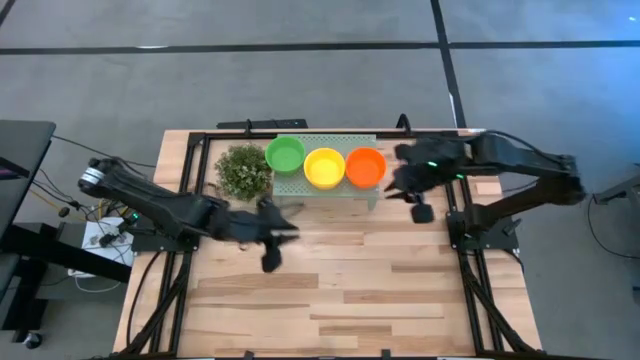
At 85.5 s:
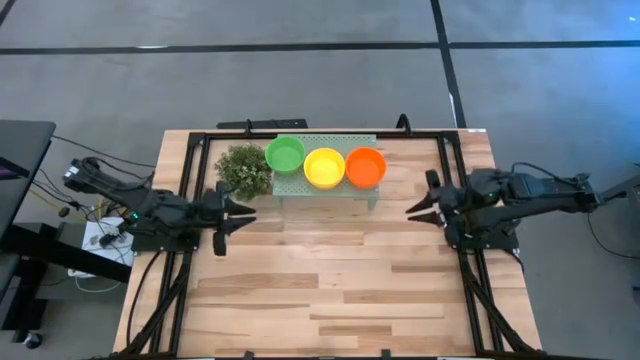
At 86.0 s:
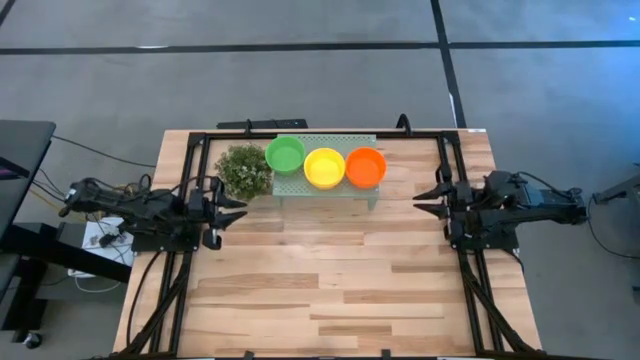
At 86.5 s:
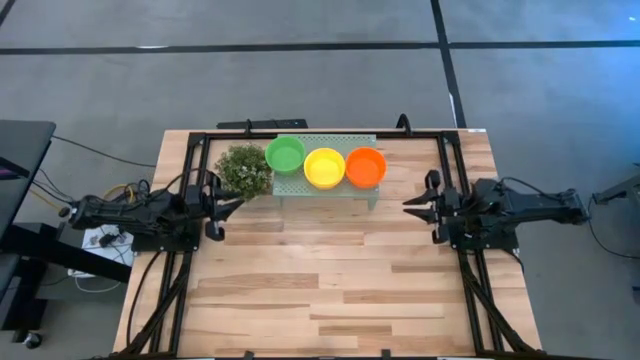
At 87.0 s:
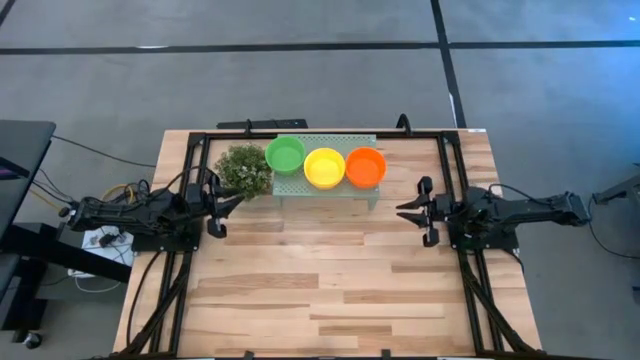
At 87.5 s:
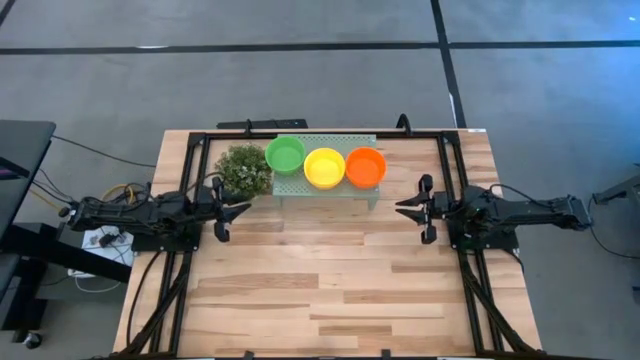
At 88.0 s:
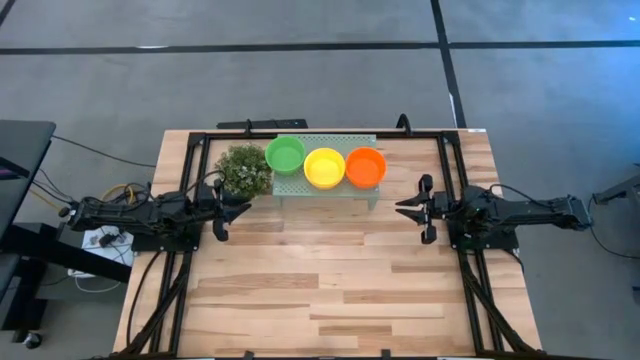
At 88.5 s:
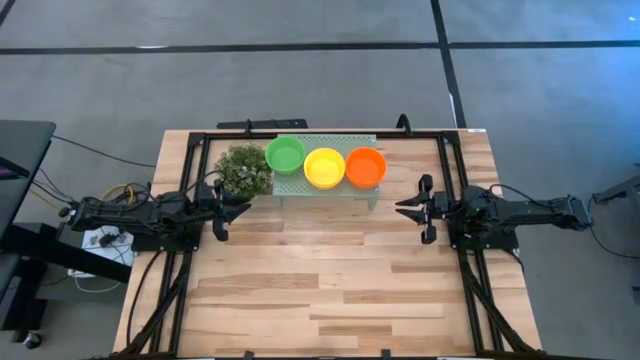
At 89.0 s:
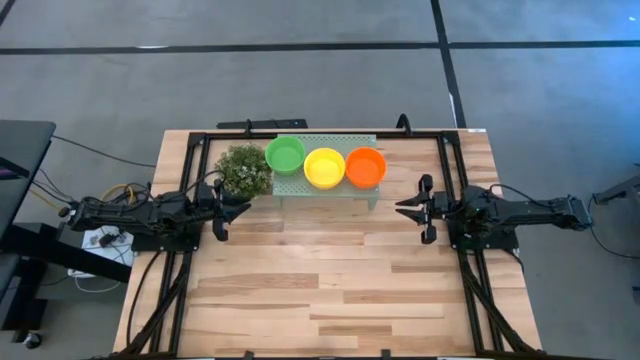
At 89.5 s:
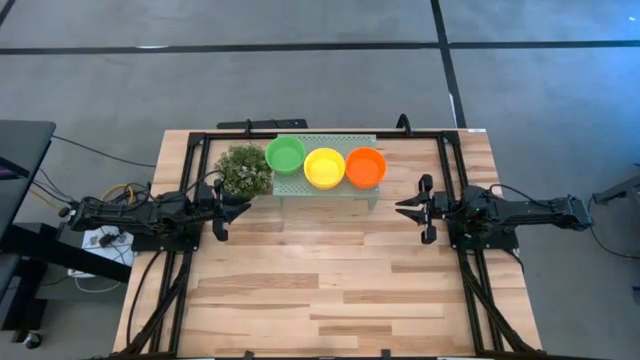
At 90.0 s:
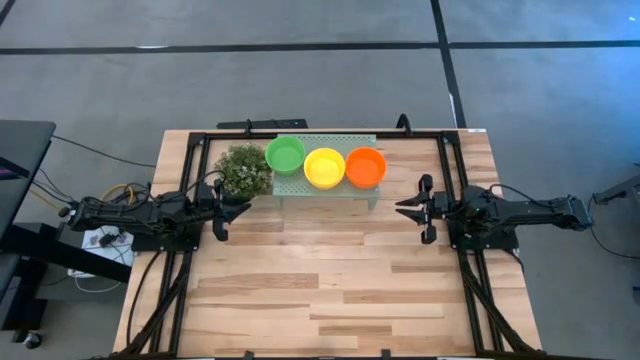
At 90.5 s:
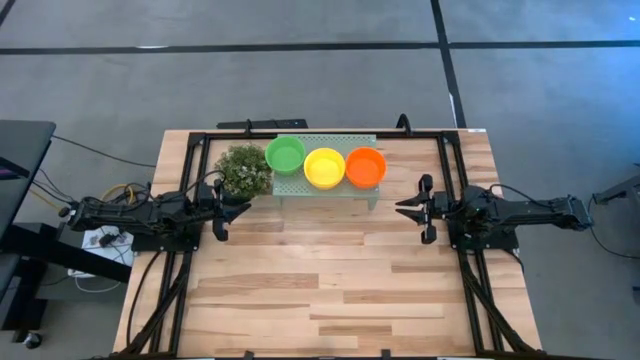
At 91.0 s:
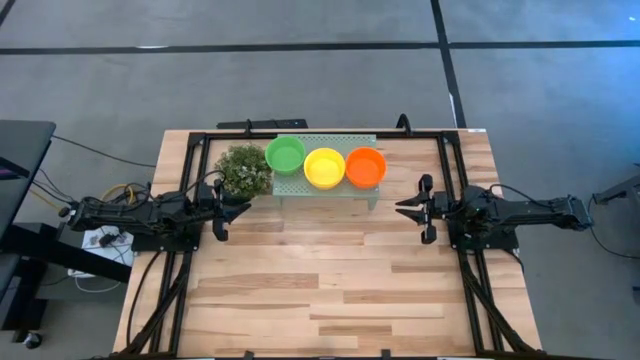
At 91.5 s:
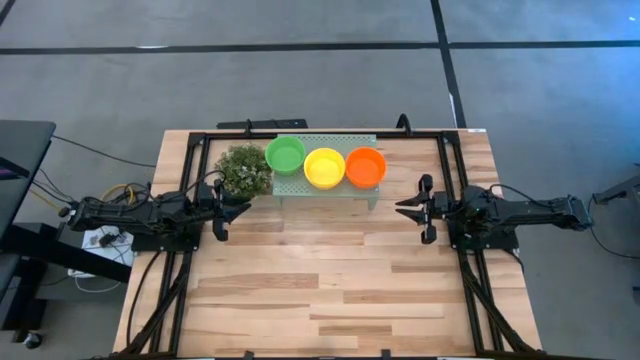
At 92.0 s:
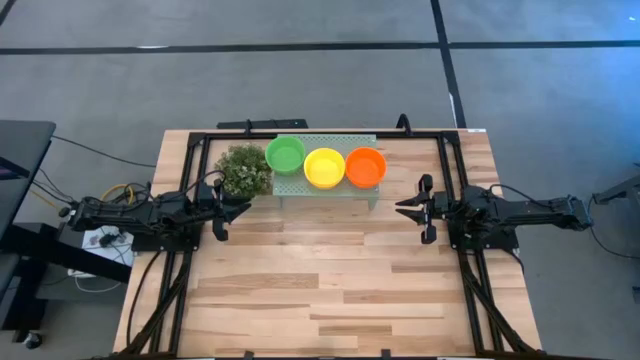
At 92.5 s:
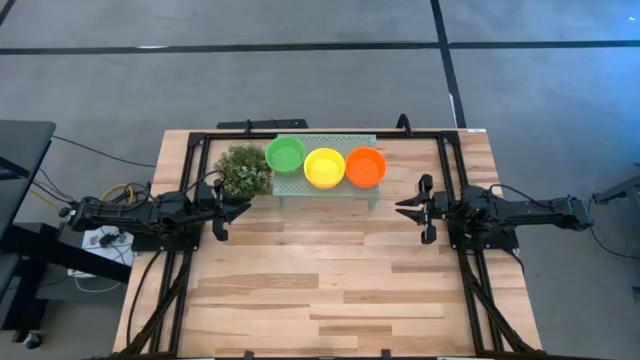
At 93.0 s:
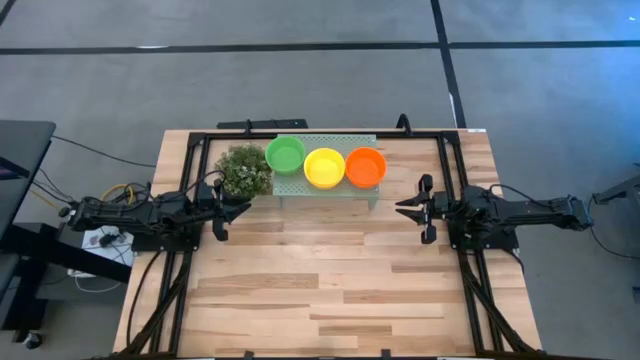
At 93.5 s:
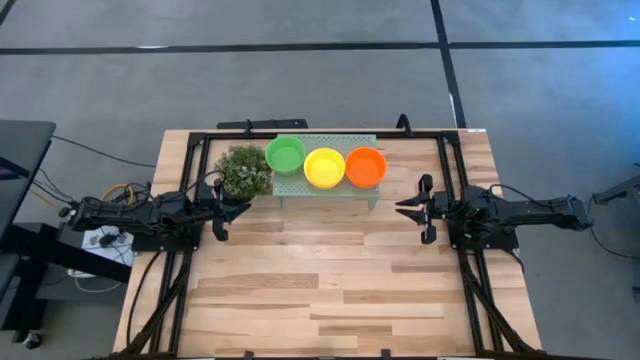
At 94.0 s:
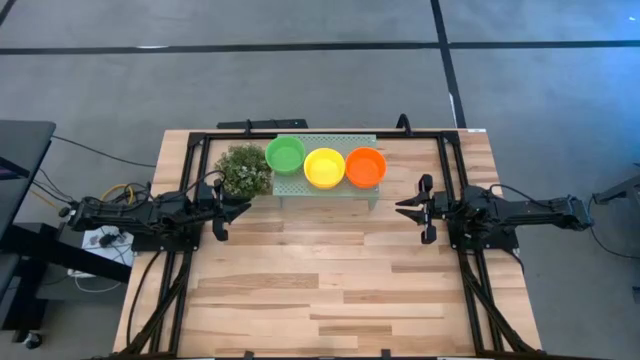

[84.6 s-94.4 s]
Task: Pick & Place Mini bowls
Return to Home Position

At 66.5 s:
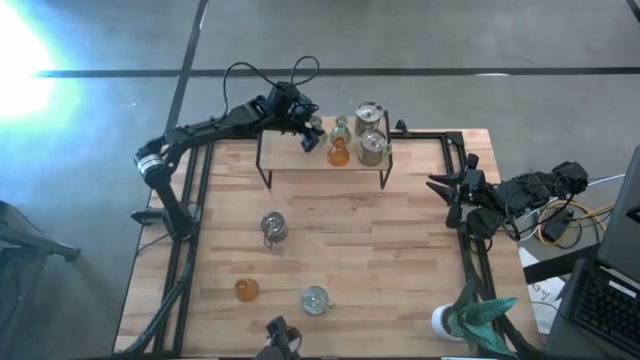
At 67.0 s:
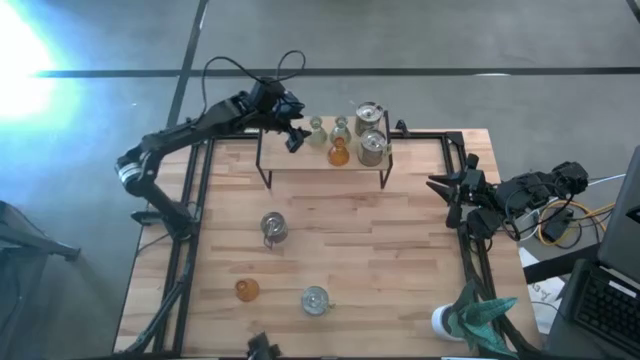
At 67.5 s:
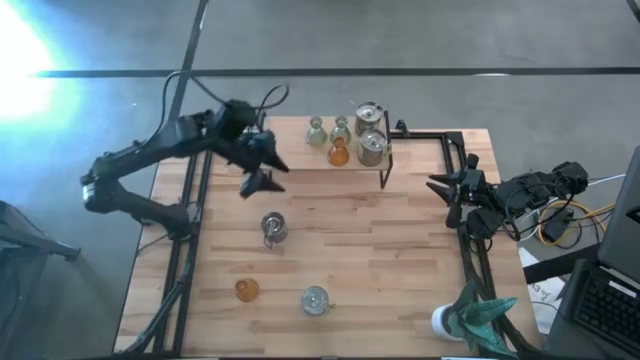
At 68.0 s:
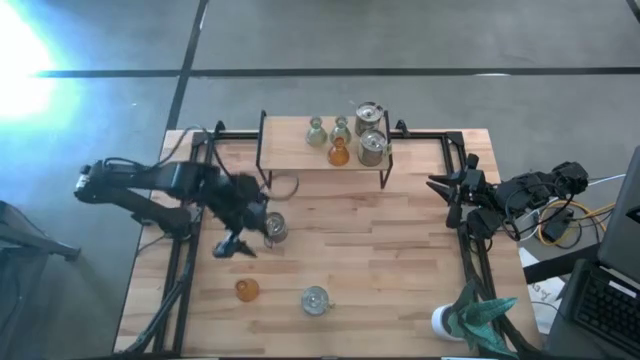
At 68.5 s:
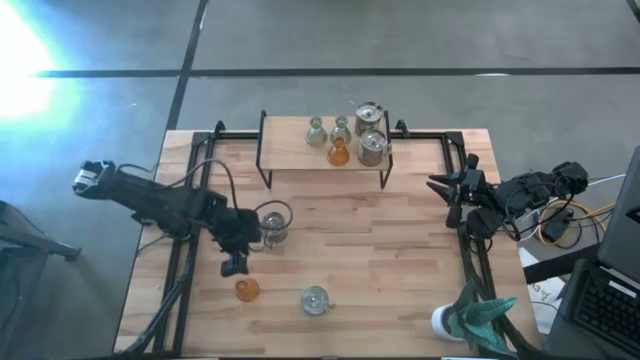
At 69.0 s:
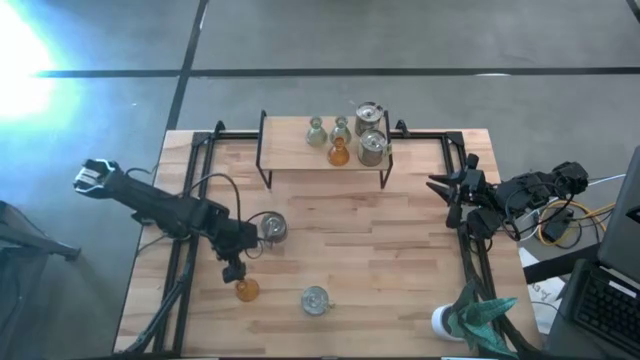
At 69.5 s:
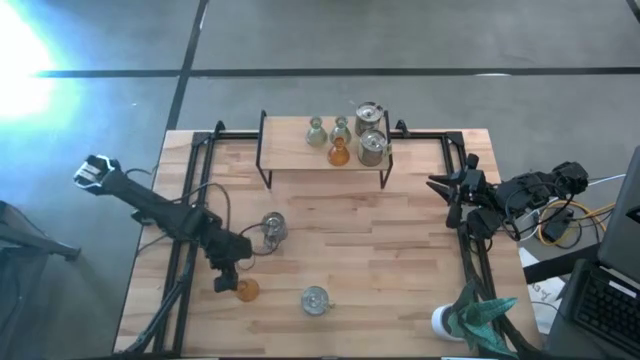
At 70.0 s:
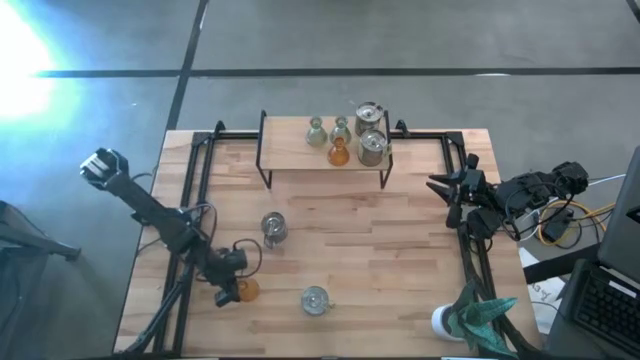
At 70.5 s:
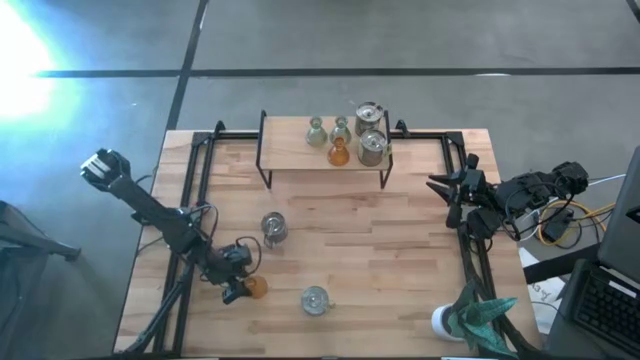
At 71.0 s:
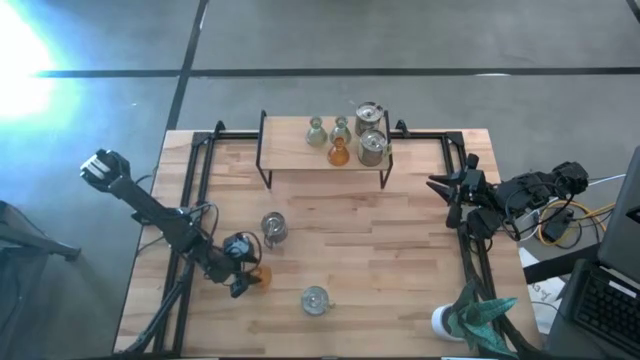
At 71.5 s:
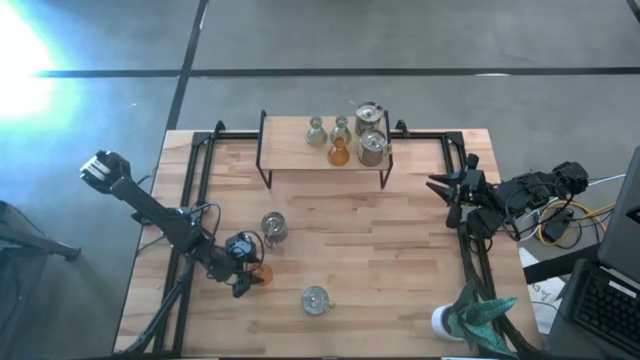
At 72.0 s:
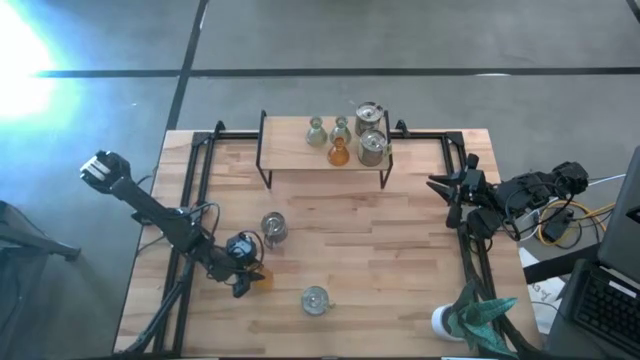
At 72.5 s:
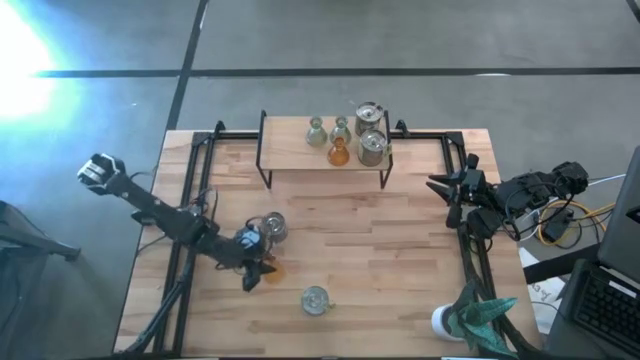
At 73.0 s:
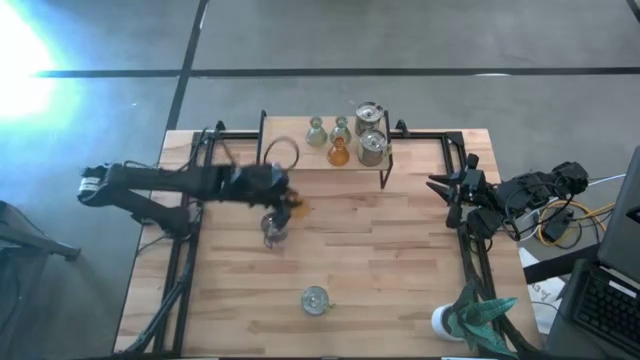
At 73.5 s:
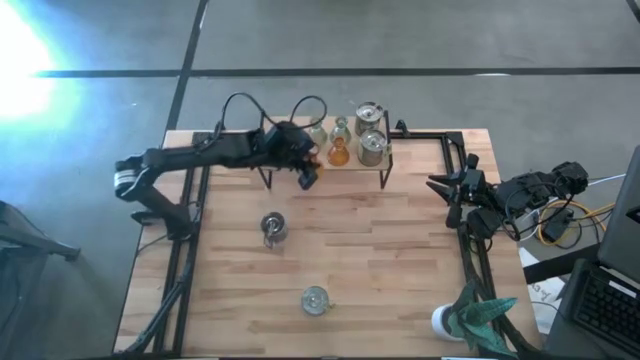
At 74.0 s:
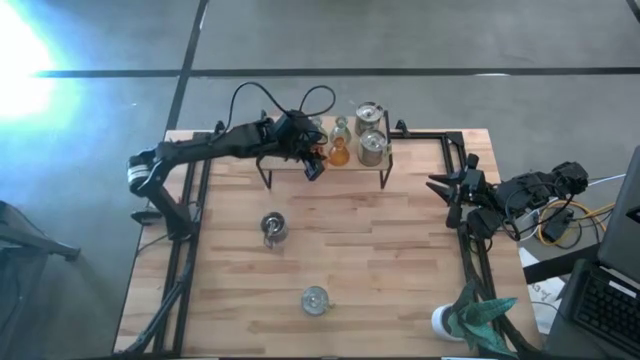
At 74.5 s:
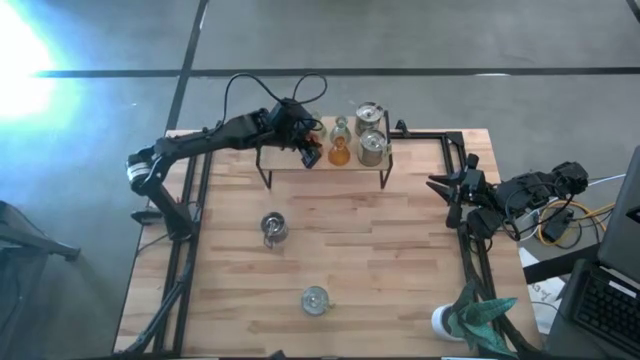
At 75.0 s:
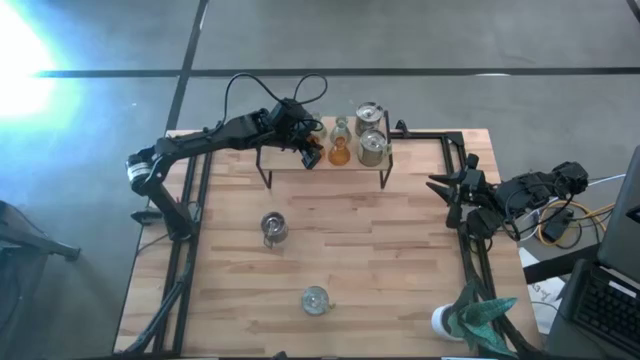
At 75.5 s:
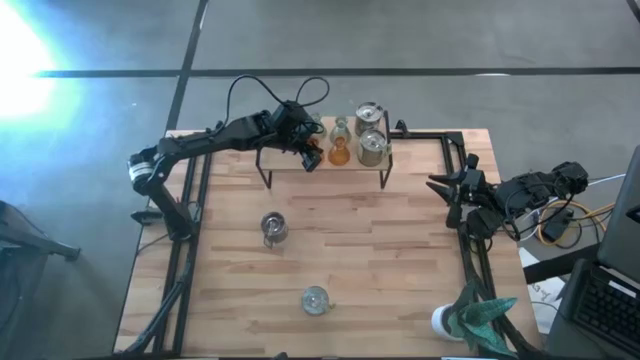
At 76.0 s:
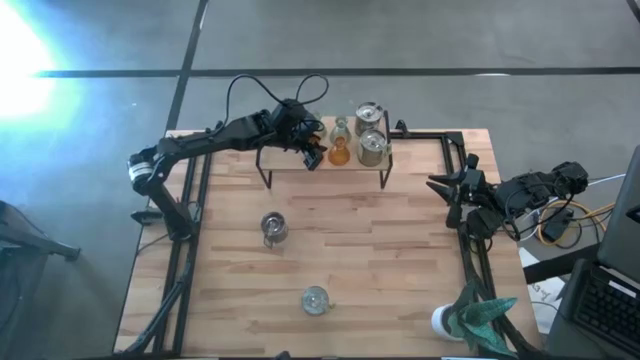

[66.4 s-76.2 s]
Task: Pick & Place candle stick holders
Put the orange glass candle holder on the shelf aligned with the green glass candle holder
